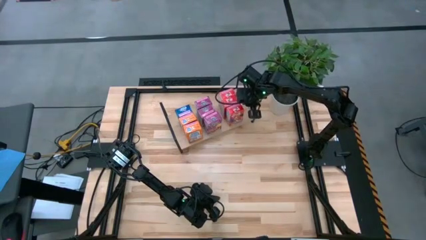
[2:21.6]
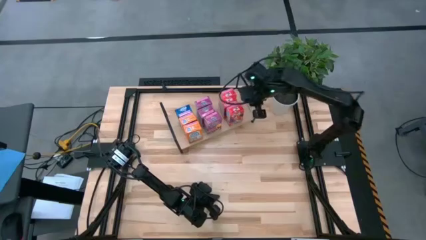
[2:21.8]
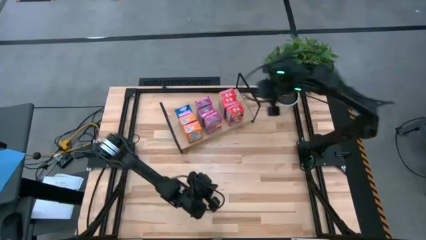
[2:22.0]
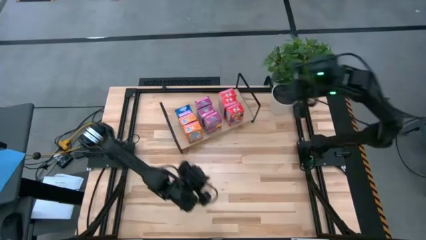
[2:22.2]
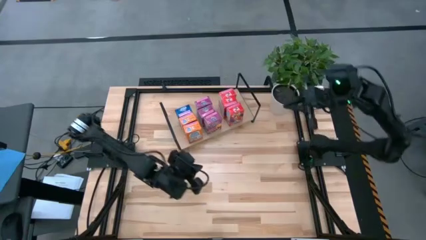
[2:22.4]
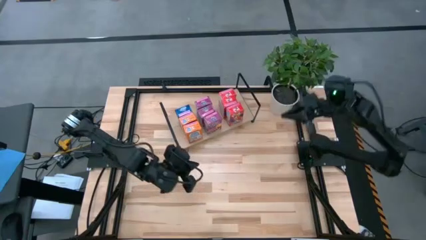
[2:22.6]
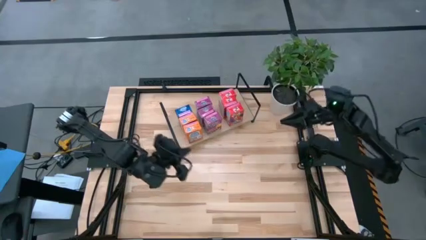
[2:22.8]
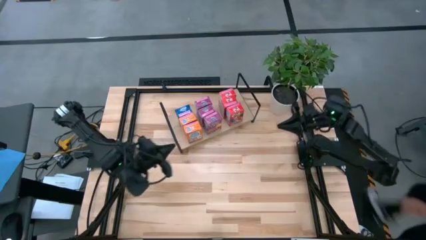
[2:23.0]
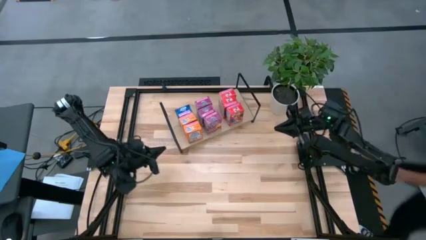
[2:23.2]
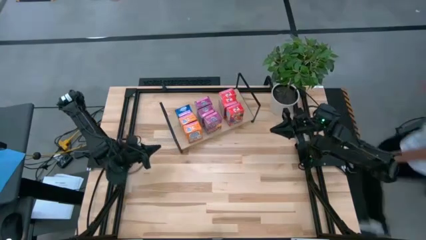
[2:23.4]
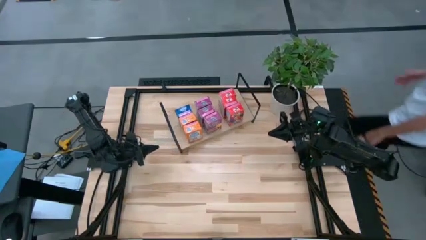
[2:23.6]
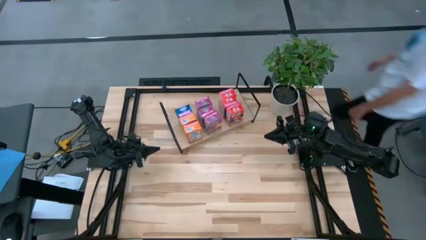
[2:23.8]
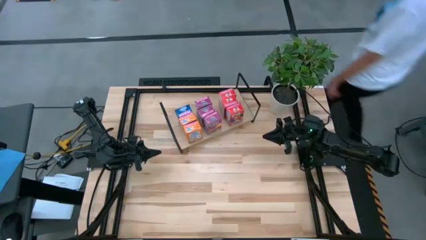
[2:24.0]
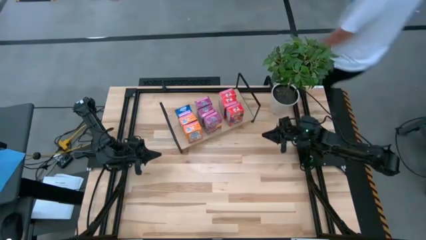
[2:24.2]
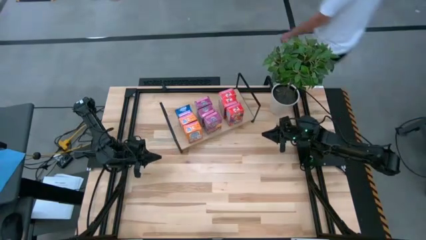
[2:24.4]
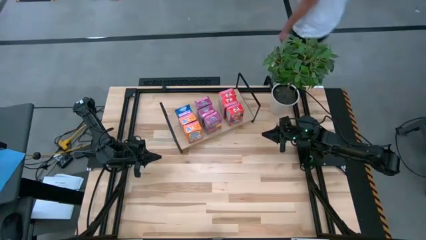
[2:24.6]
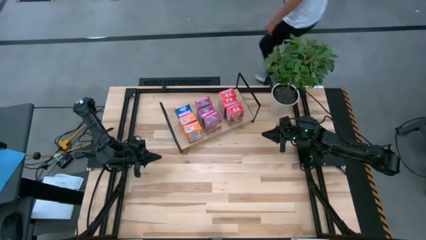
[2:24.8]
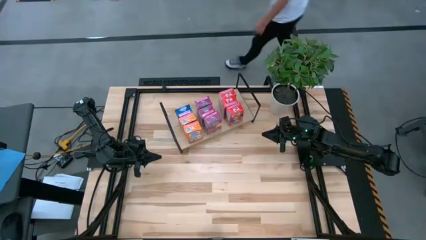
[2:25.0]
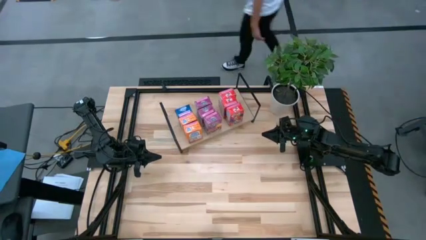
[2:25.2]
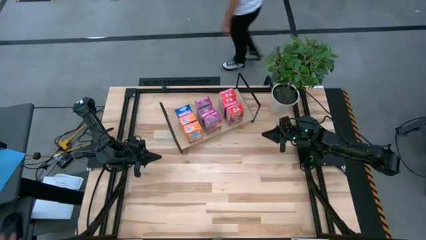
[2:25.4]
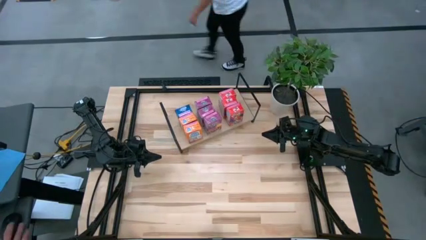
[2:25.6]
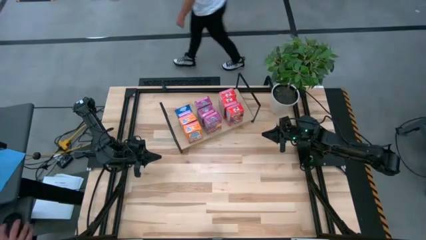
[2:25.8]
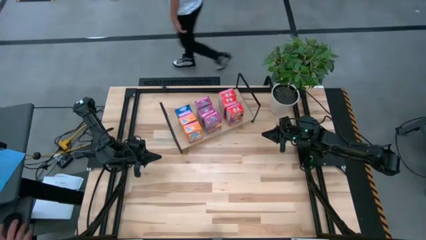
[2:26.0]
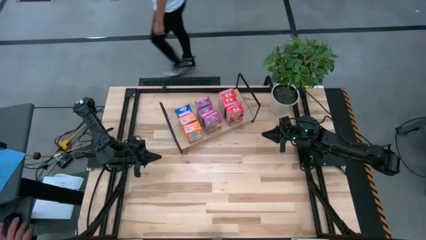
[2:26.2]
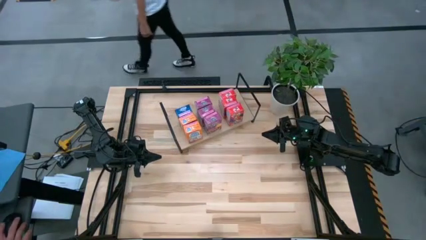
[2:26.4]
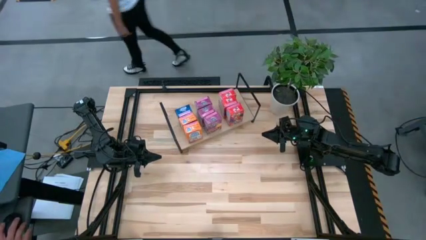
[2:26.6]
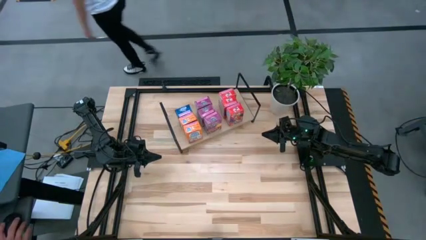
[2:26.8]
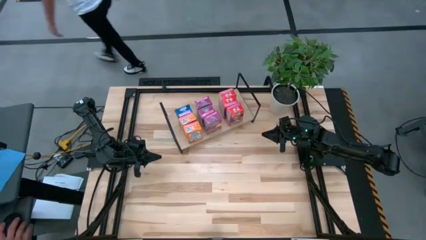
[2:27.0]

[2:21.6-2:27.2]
Task: Stack cereal on shelf
Return to Home Position

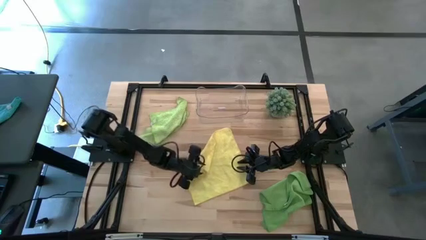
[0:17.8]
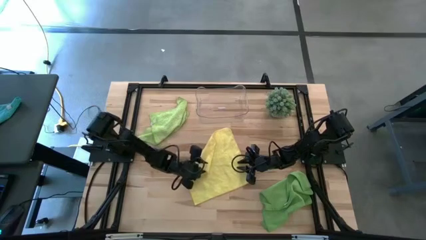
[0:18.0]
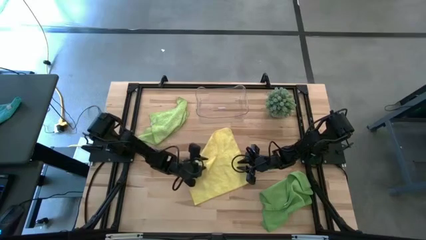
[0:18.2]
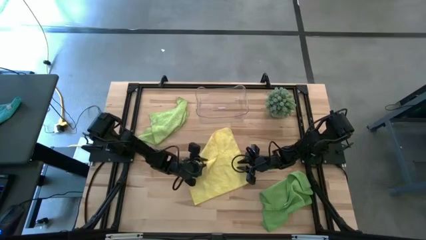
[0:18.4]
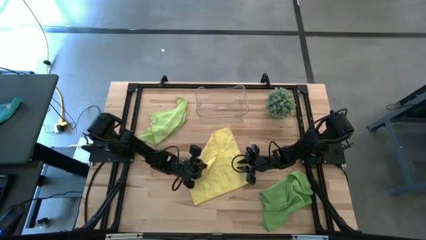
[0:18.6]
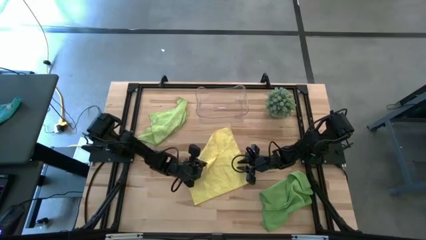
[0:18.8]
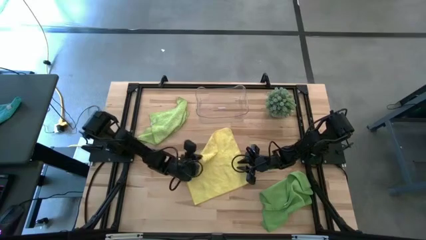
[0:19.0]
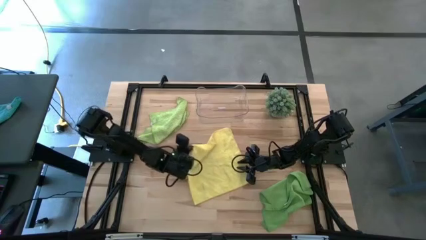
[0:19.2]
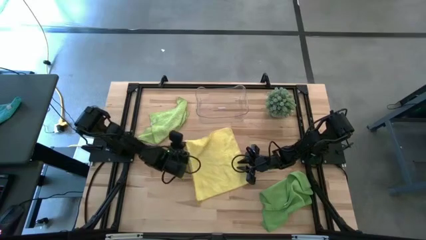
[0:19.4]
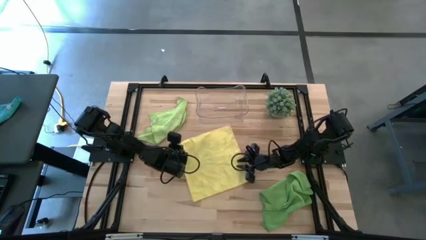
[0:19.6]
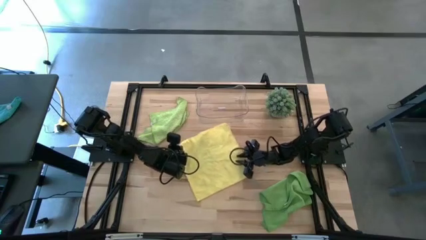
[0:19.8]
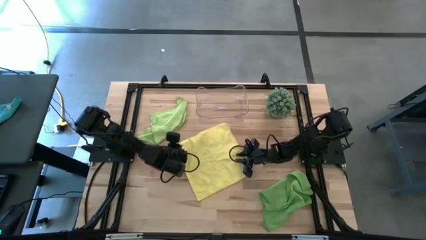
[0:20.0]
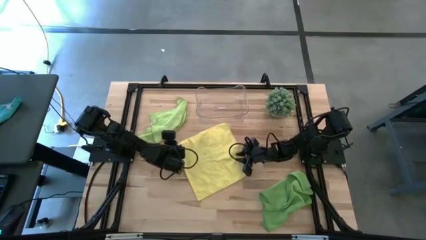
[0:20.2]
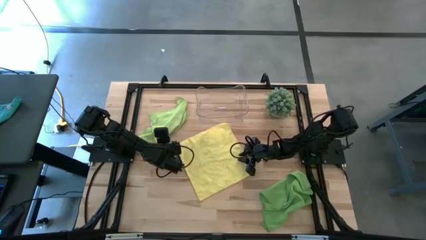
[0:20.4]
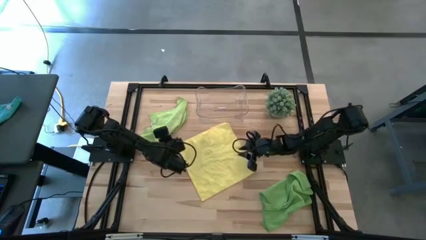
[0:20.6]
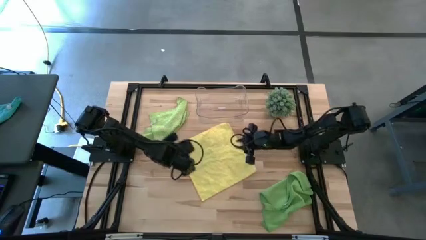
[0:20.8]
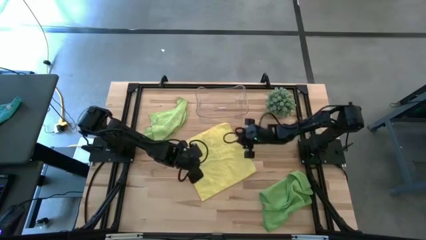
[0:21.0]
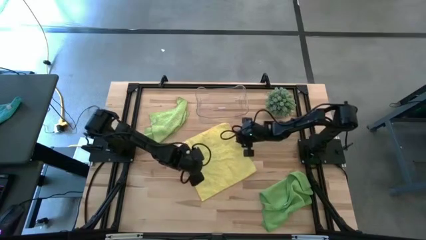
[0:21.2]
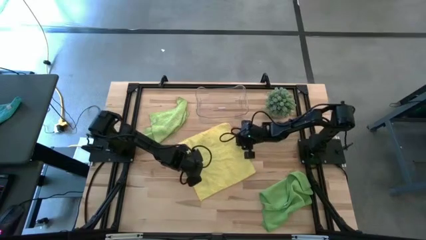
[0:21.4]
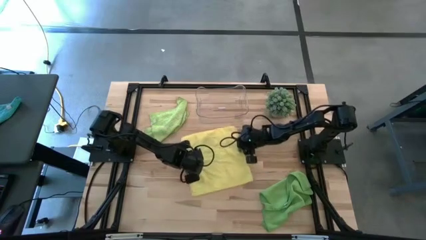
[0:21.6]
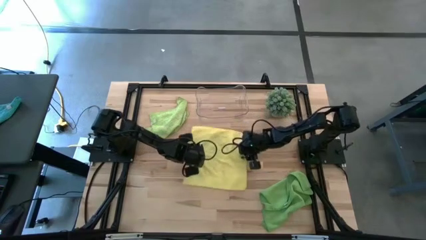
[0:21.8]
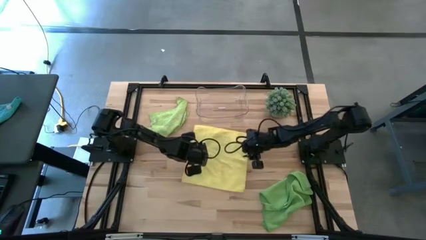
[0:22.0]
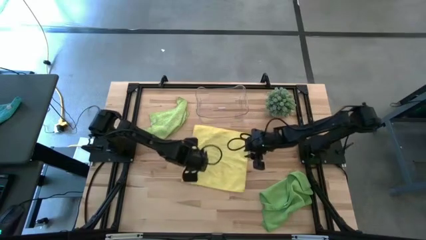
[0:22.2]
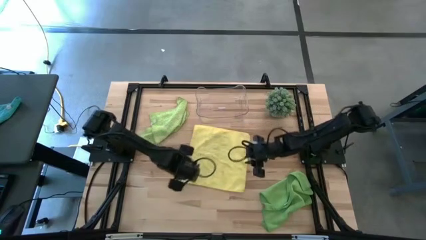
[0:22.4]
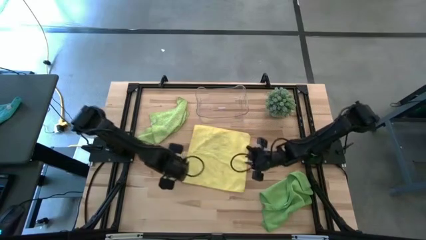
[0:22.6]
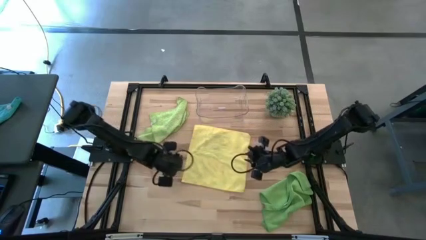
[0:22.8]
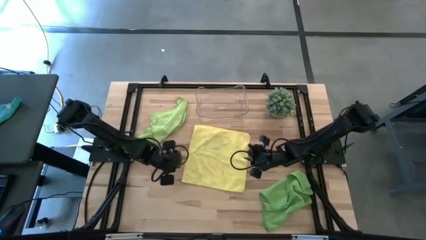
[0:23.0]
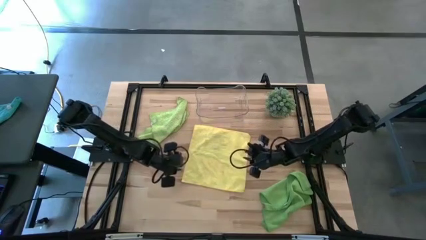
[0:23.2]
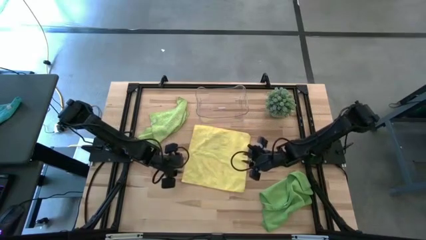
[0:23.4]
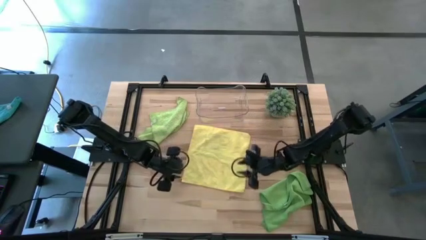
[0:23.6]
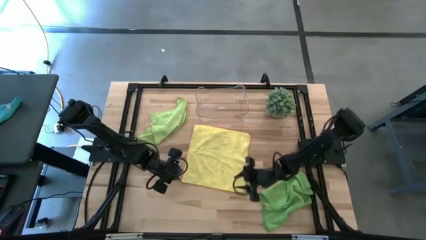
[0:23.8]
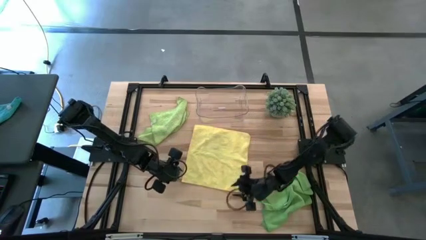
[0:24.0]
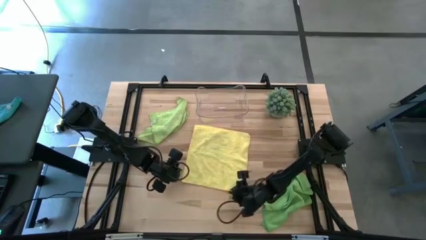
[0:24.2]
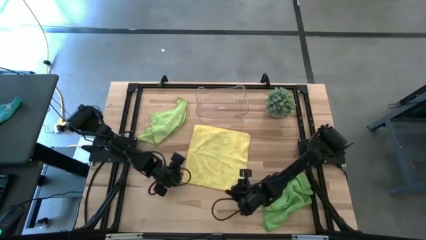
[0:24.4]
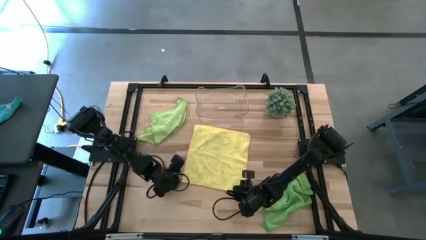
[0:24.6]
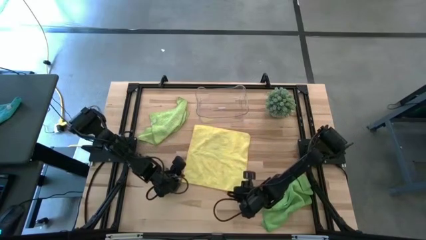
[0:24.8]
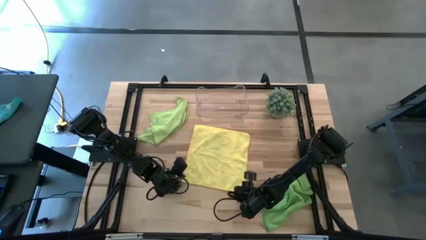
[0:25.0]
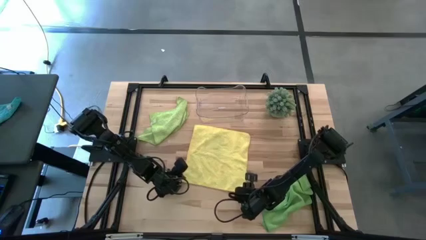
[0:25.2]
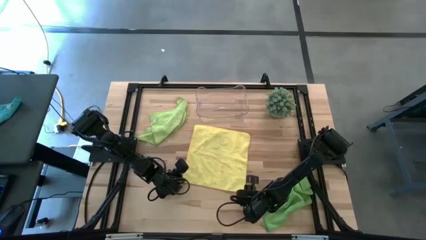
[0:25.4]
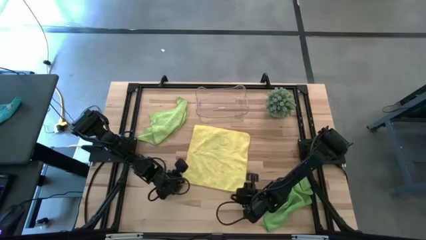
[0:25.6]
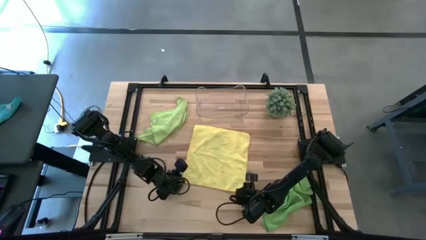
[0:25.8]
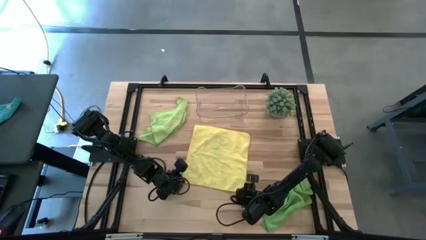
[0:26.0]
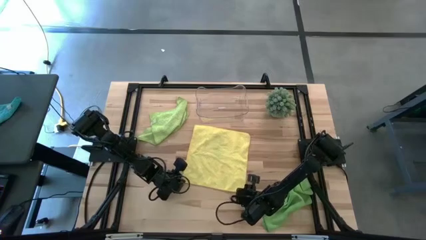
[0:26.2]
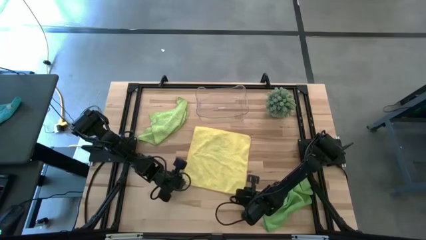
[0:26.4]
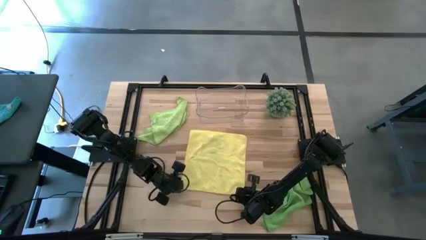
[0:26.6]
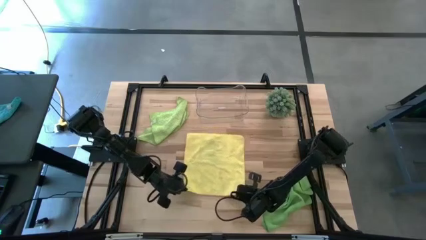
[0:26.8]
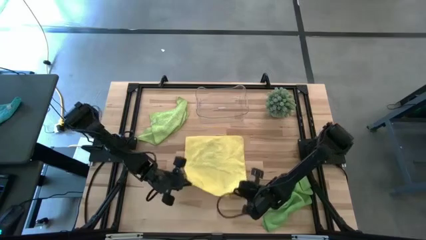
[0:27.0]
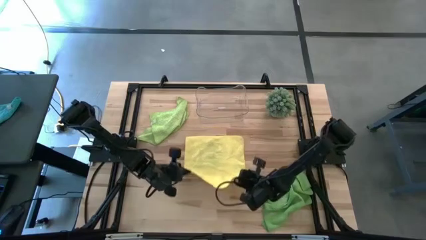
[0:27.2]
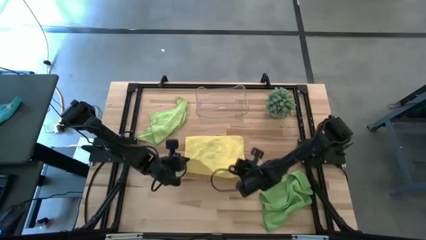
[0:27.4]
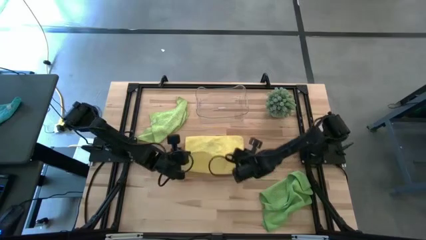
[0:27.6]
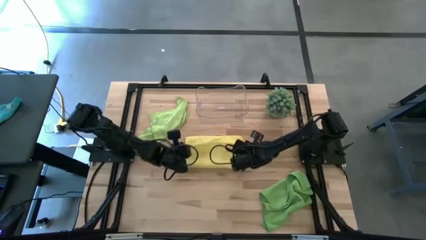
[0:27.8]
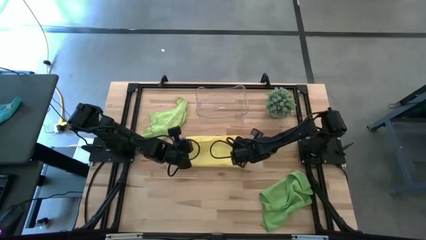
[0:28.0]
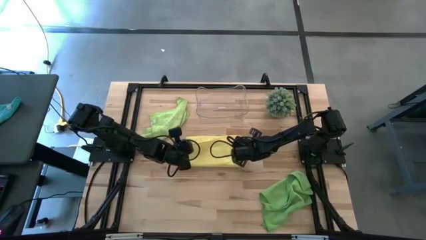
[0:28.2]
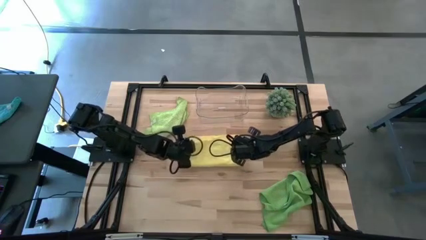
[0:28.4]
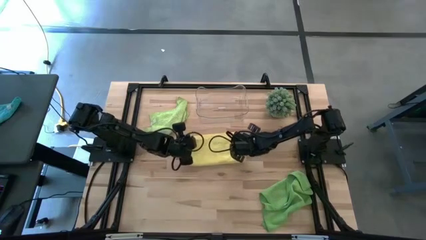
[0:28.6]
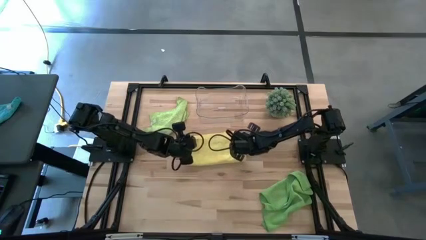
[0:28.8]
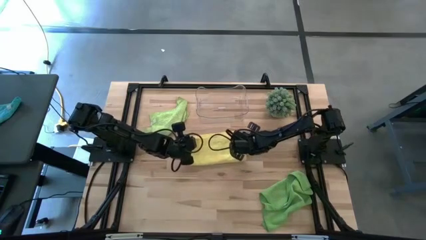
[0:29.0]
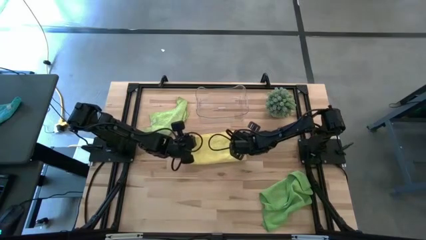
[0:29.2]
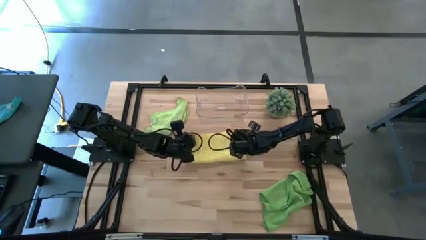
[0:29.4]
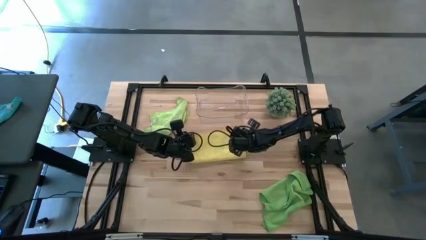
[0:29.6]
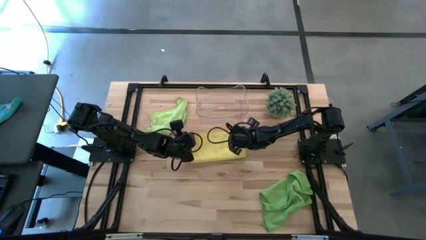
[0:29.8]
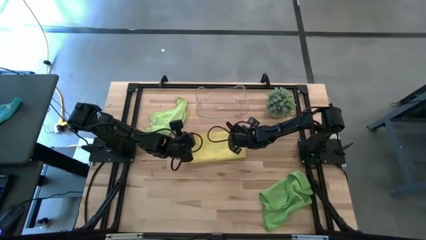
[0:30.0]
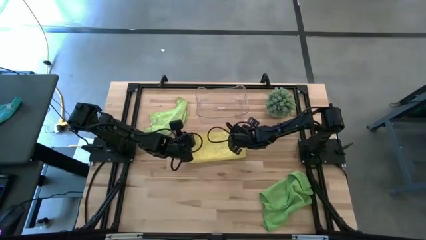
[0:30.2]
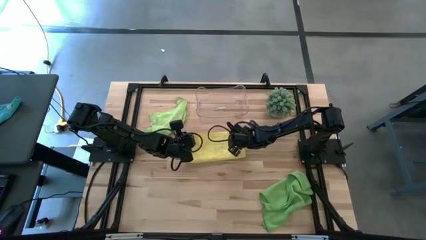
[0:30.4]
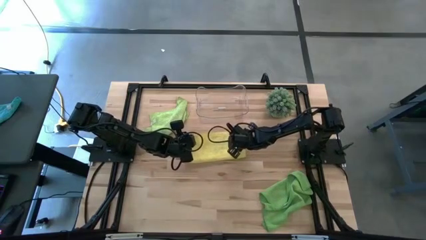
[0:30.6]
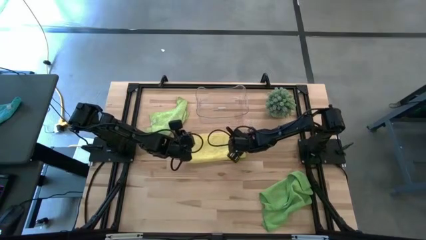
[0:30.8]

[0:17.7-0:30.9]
Task: Roll microfiber towels into tight, uniform cylinder then place into a basket
Fold the yellow microfiber towel
